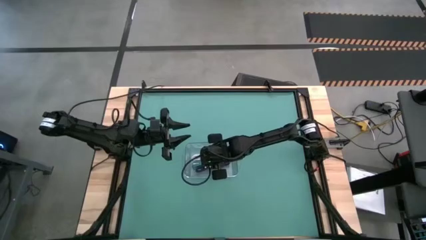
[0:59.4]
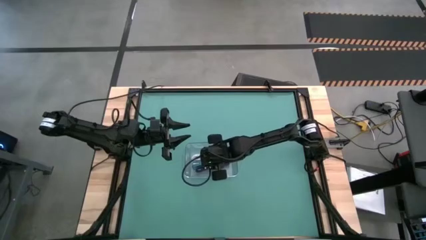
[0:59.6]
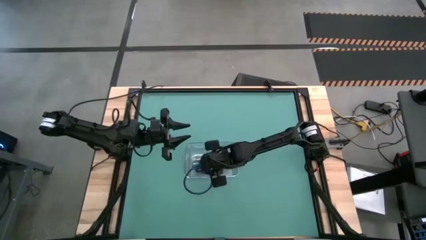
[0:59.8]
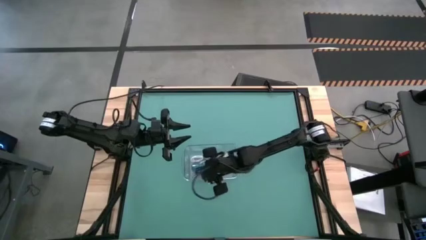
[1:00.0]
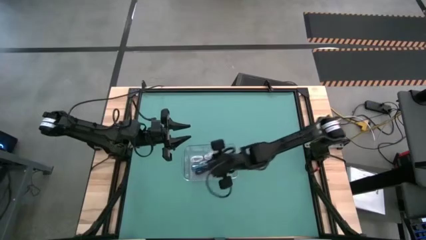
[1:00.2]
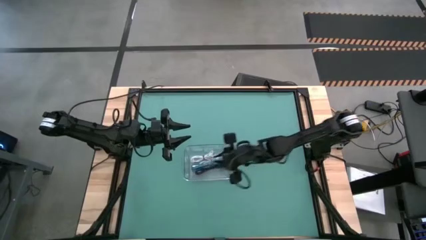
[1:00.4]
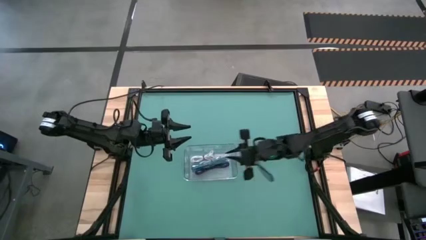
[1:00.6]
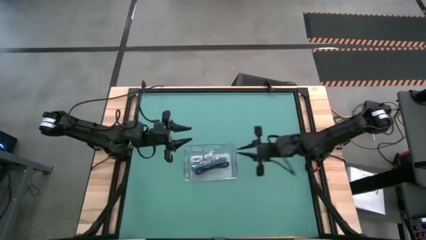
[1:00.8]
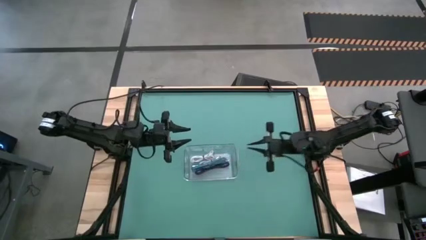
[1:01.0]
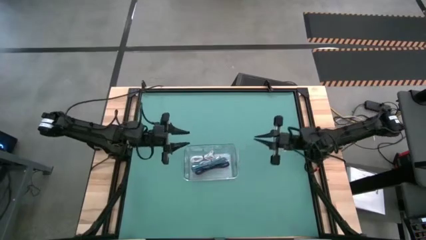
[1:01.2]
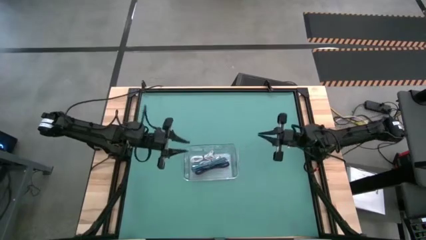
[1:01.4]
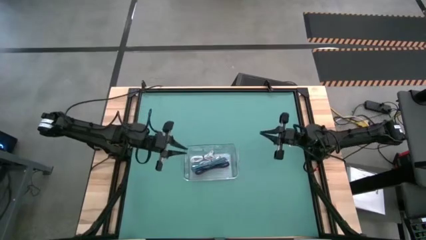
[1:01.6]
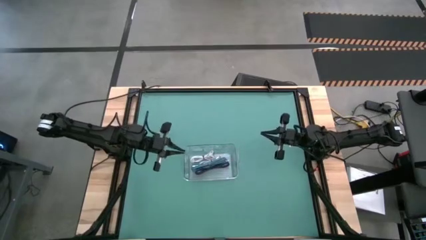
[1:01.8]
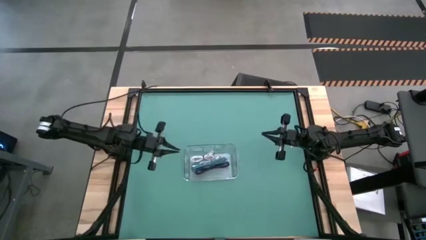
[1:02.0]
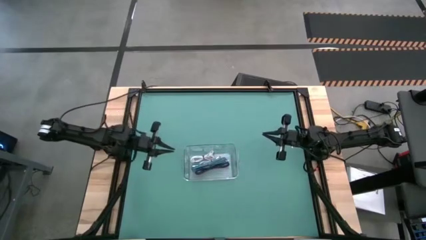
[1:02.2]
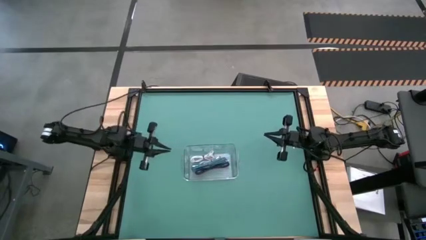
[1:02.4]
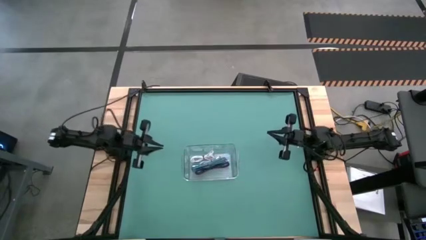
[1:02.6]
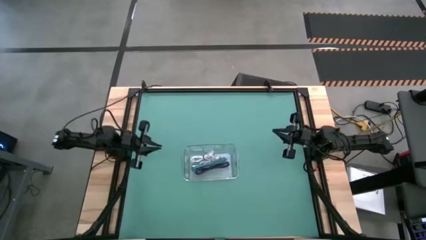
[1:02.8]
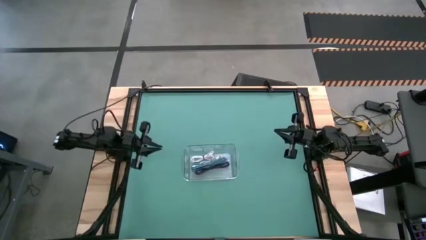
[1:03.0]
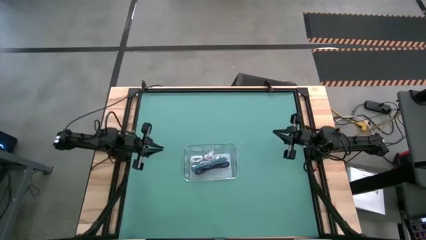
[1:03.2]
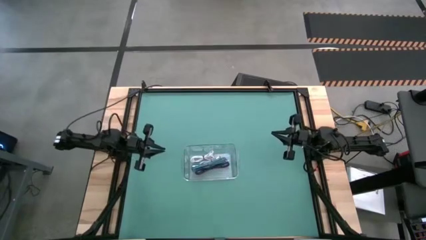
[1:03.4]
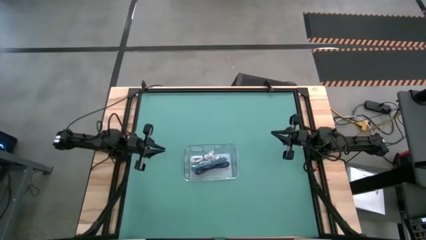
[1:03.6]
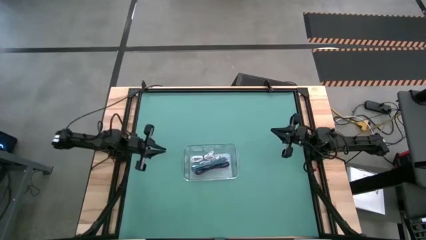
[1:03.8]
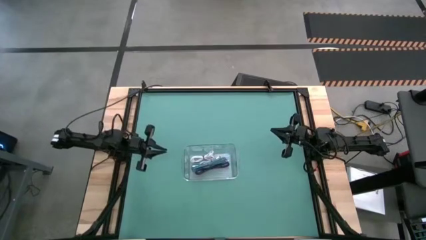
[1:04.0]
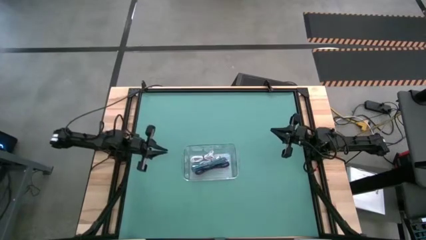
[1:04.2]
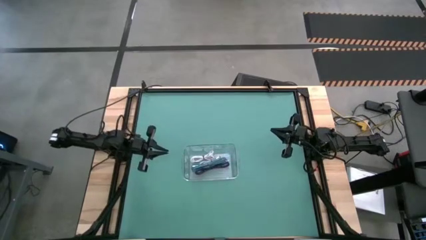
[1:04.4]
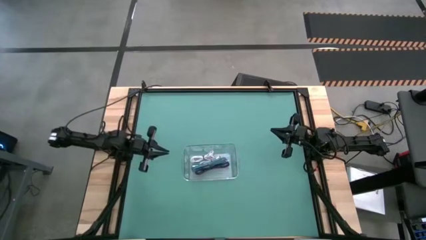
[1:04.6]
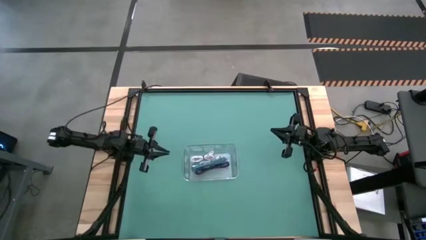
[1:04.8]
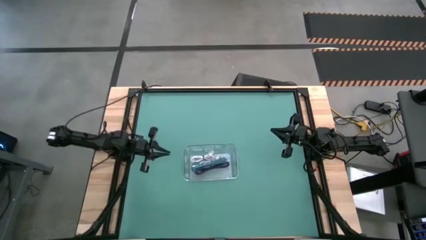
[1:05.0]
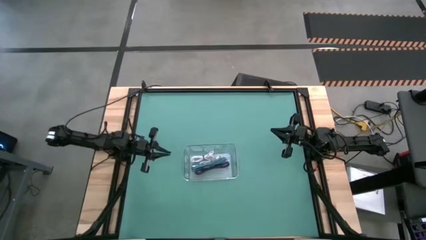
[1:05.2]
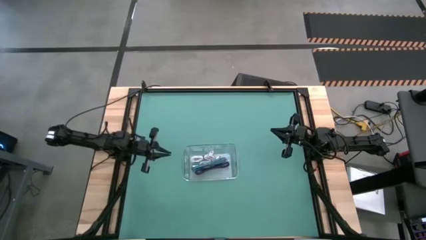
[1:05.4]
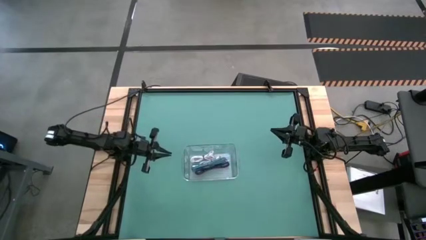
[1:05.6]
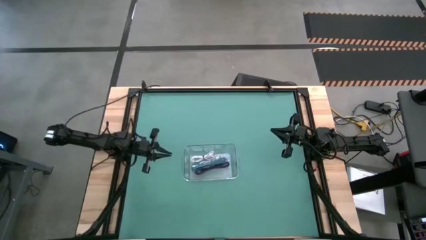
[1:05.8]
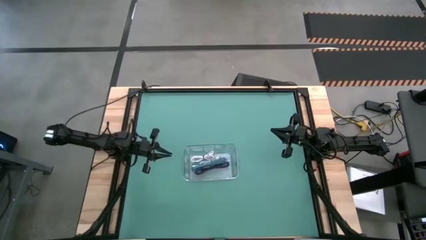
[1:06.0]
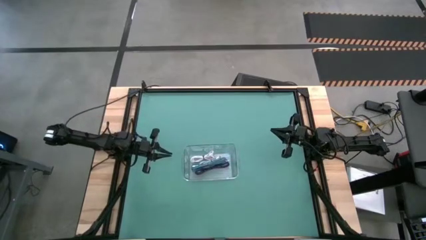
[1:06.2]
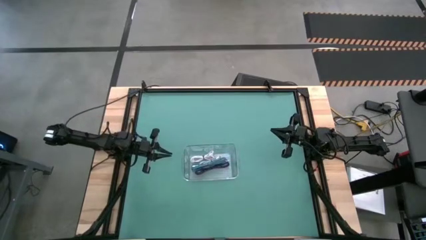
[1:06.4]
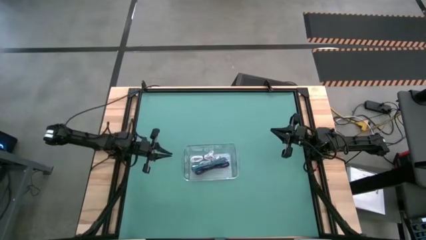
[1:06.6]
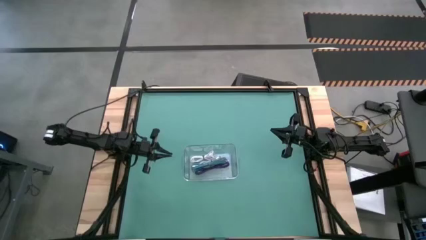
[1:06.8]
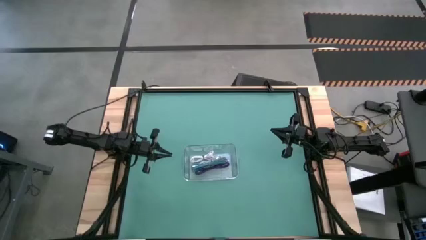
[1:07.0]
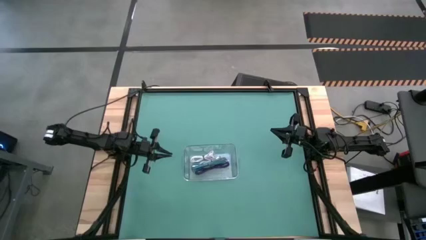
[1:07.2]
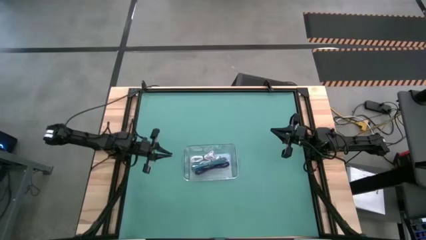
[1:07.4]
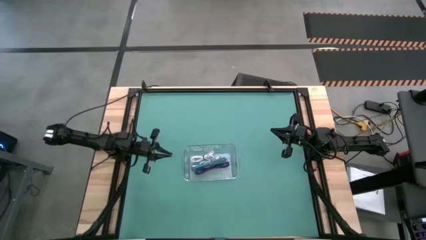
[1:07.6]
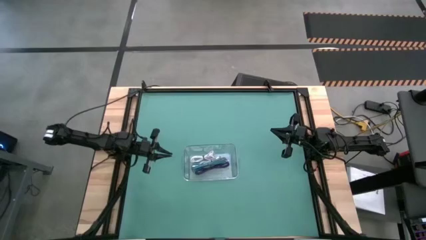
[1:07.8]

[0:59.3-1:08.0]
Task: Pick and place USB-C Cables
Return to Home Position

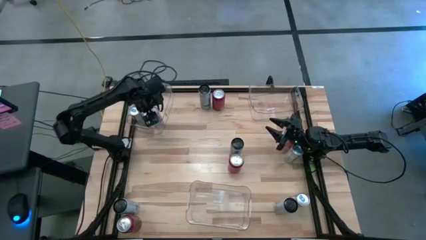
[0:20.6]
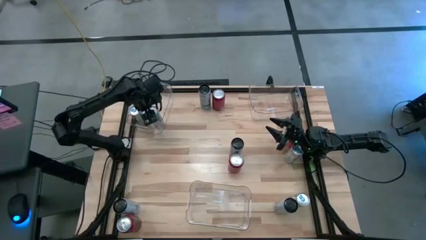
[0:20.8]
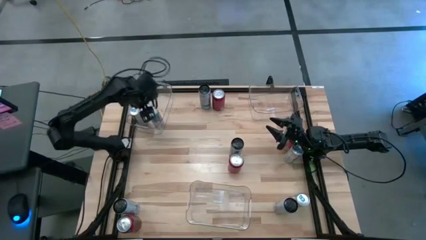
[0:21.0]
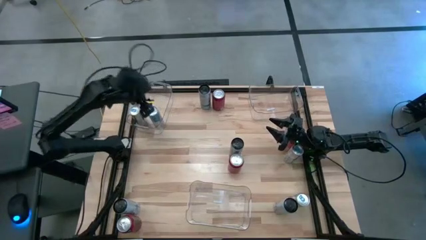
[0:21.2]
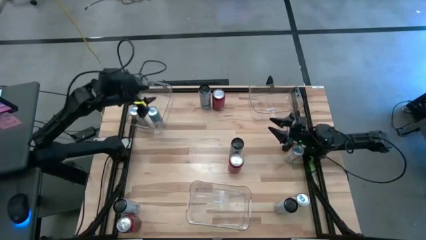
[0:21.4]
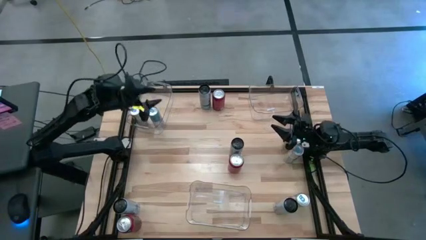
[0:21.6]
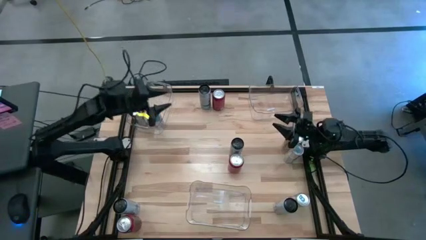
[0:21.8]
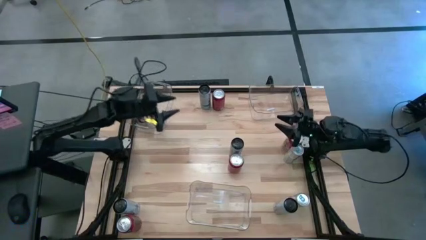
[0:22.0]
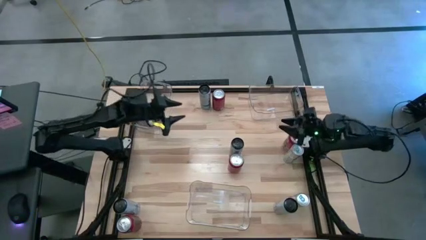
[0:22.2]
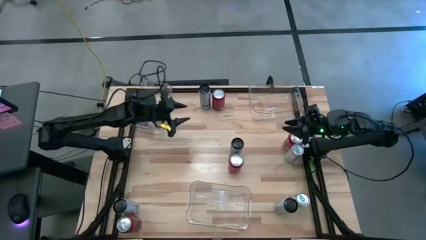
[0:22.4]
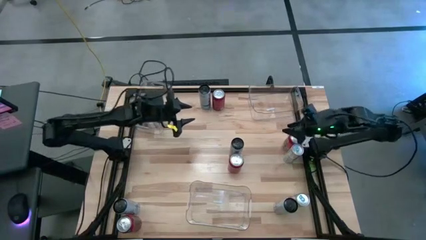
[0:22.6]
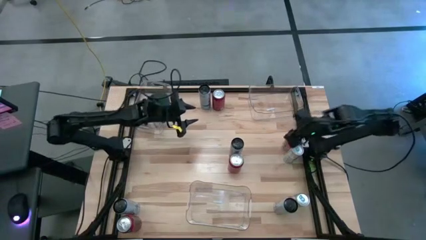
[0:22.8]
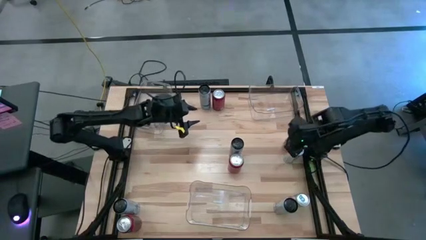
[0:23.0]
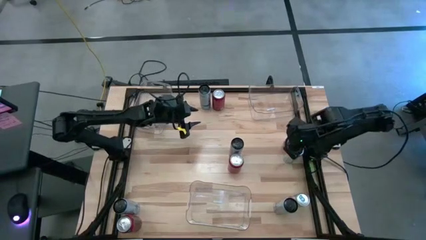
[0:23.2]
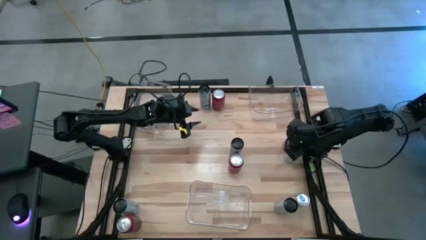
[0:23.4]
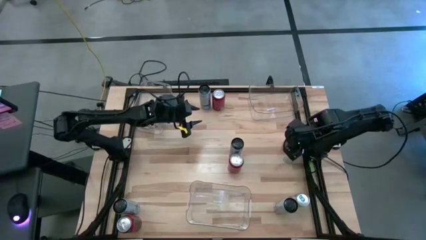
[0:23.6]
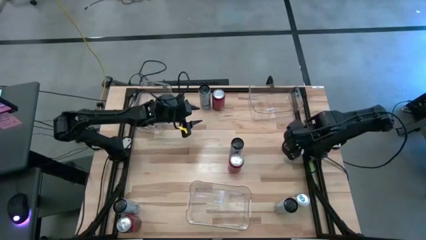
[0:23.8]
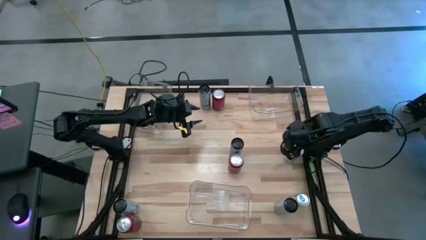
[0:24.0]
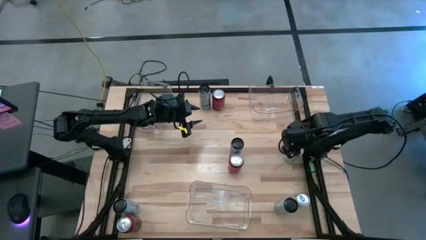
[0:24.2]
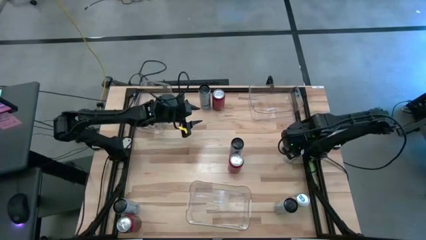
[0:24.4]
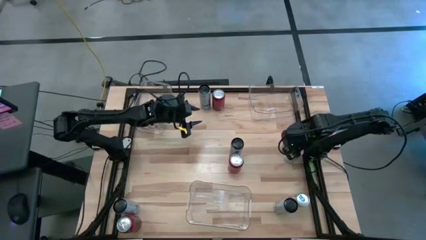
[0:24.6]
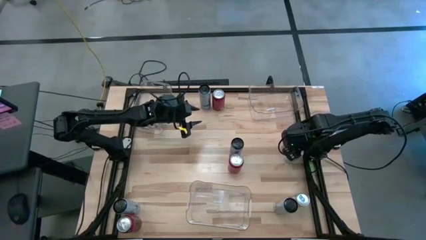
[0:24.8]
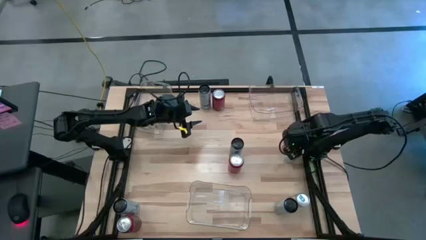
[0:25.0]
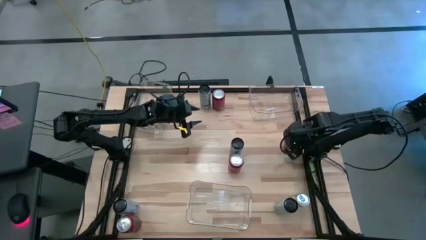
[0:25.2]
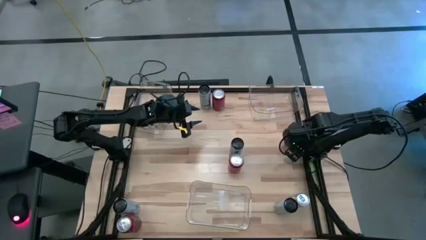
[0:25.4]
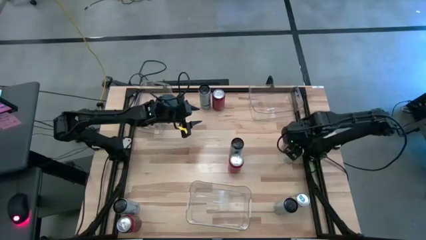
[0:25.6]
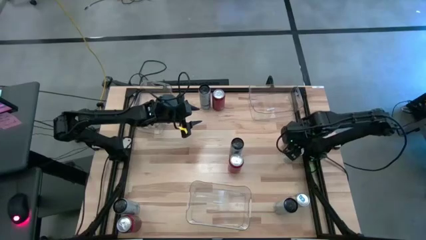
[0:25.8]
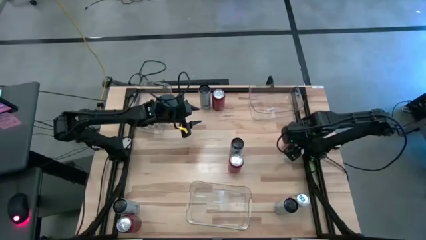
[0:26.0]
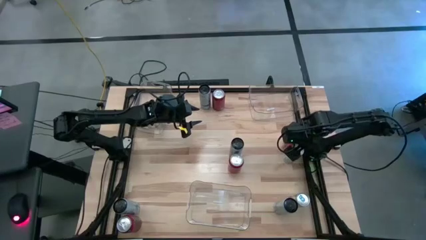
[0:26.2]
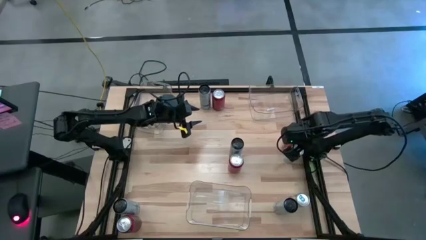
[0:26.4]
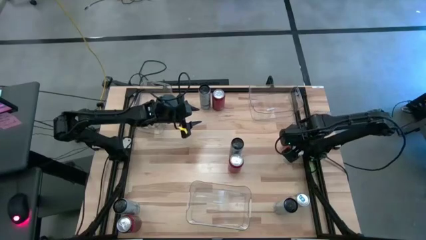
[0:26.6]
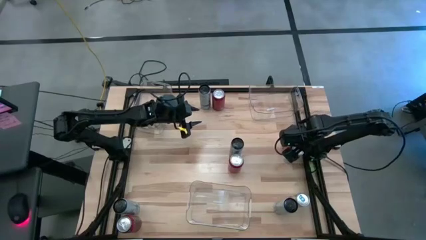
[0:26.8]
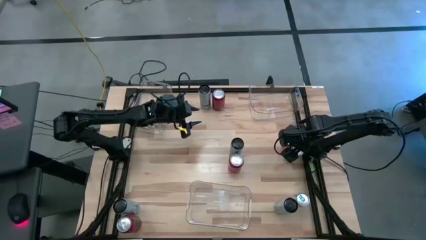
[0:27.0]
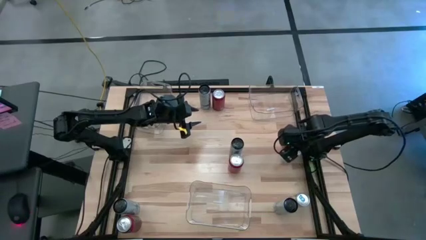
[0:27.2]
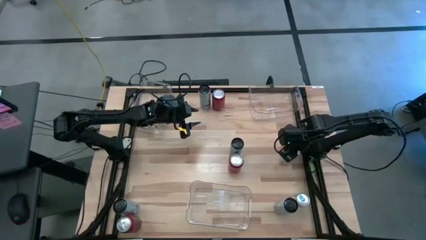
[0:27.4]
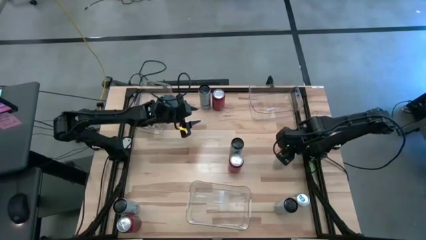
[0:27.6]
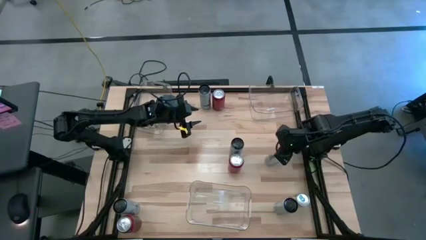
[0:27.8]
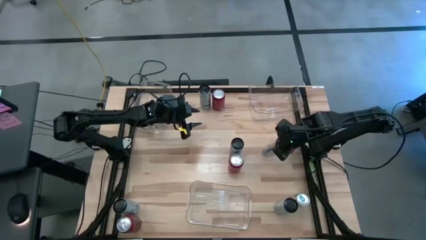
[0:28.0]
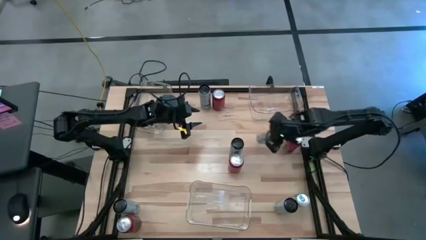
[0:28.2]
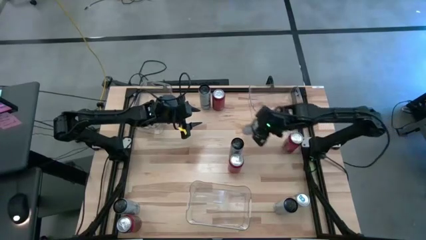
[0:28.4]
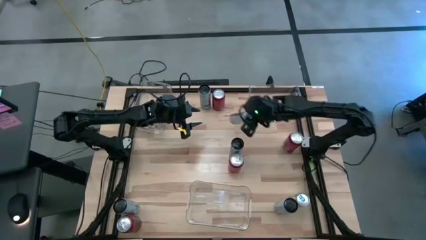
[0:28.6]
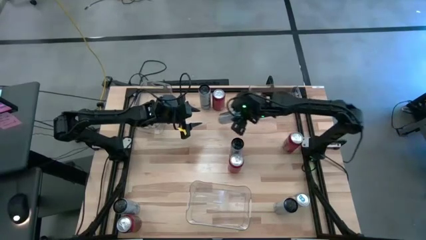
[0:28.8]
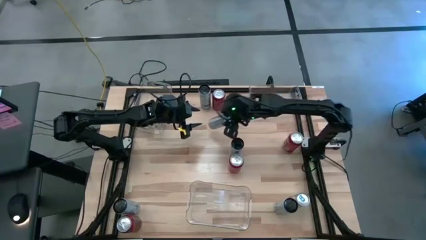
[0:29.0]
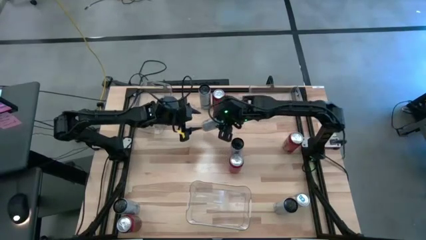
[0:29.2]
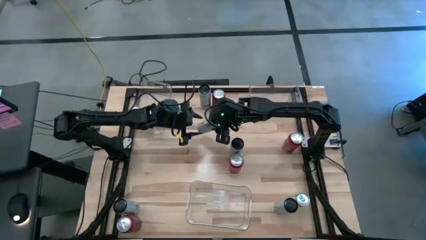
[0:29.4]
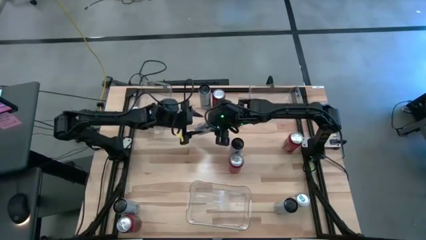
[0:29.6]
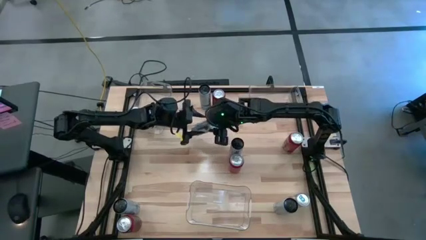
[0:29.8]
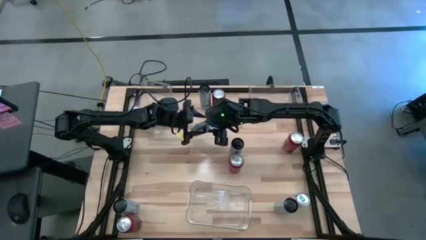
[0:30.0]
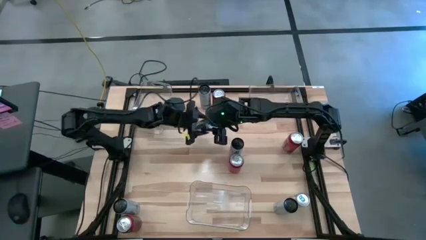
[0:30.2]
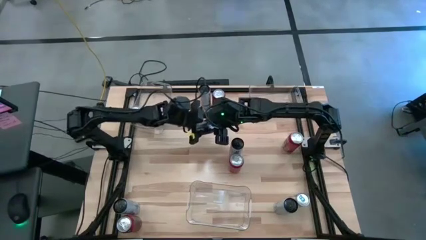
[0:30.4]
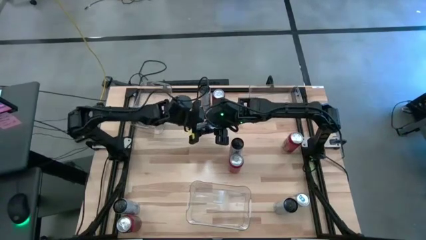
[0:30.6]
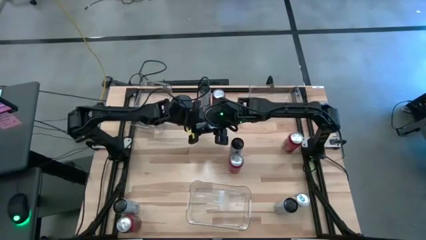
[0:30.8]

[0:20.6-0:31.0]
Task: Sort soda cans
Put the blue soda can into the top left transparent bin
